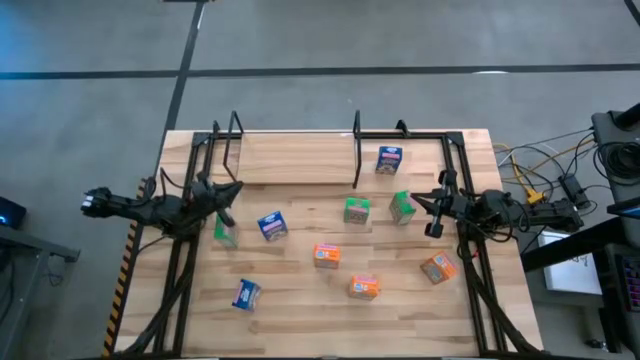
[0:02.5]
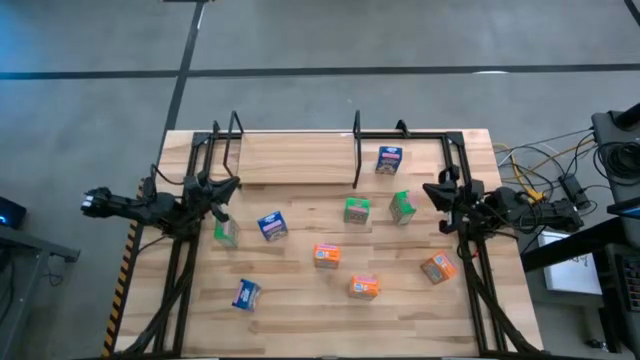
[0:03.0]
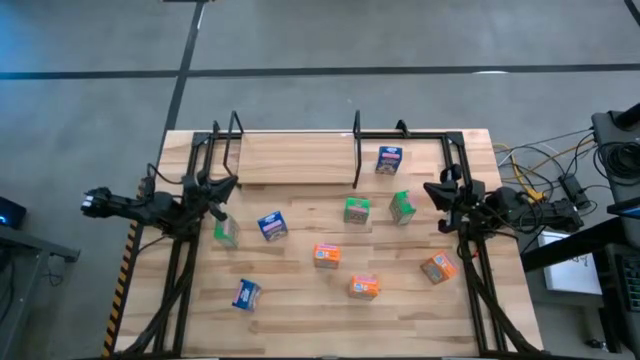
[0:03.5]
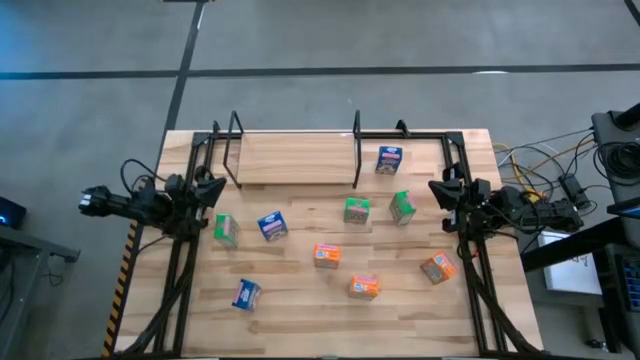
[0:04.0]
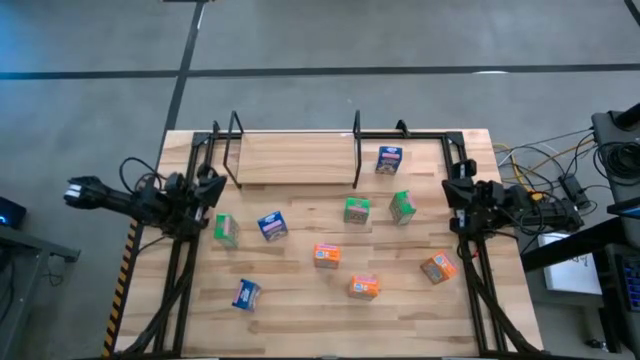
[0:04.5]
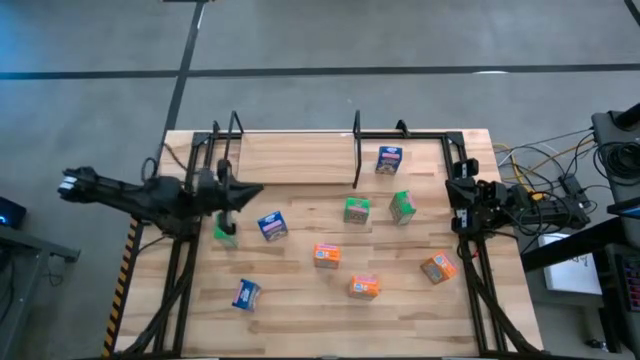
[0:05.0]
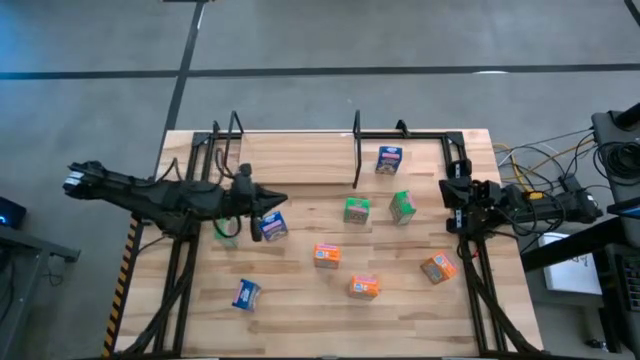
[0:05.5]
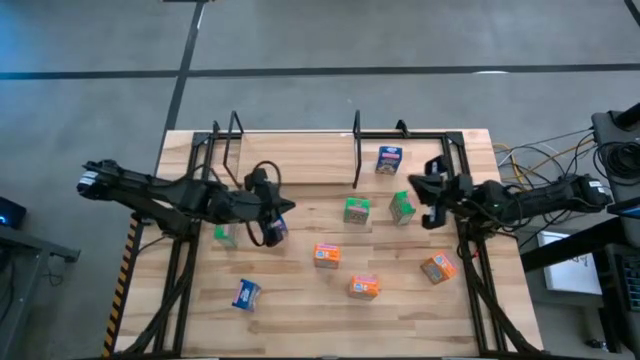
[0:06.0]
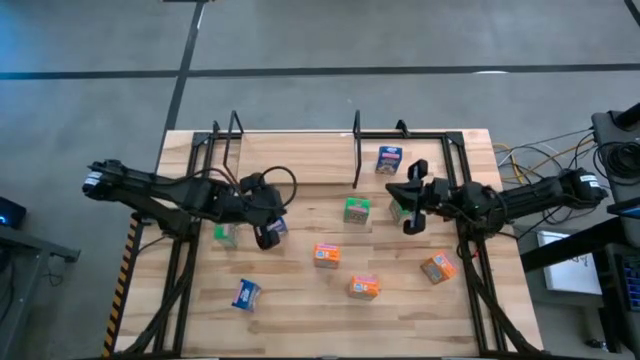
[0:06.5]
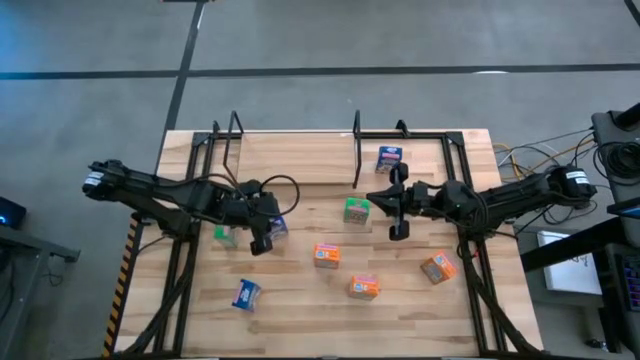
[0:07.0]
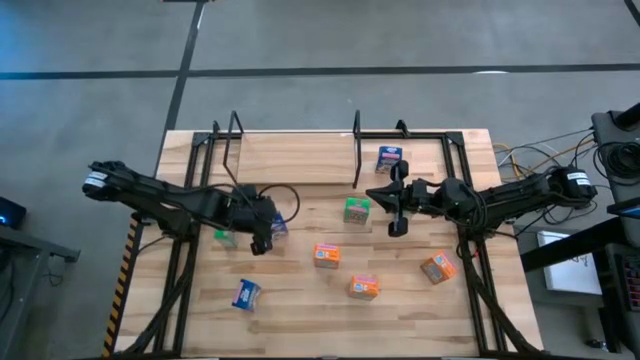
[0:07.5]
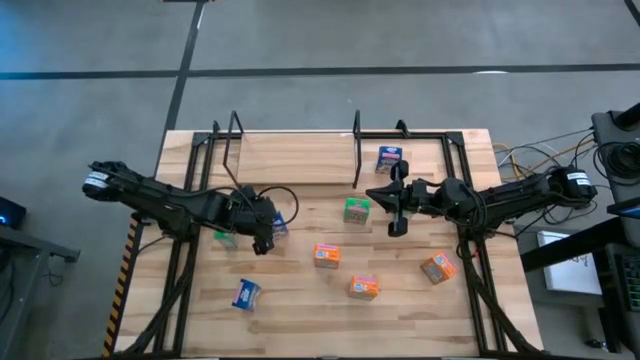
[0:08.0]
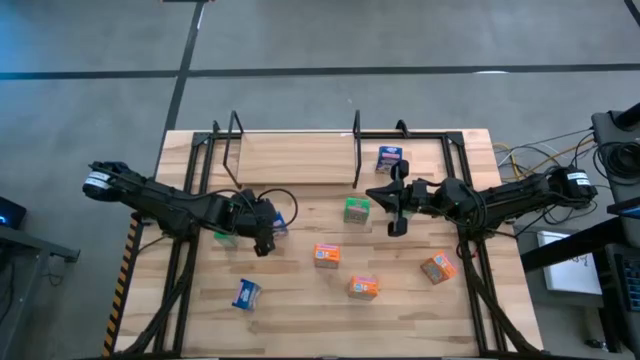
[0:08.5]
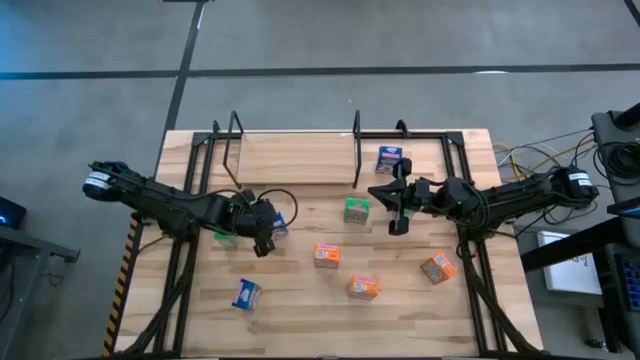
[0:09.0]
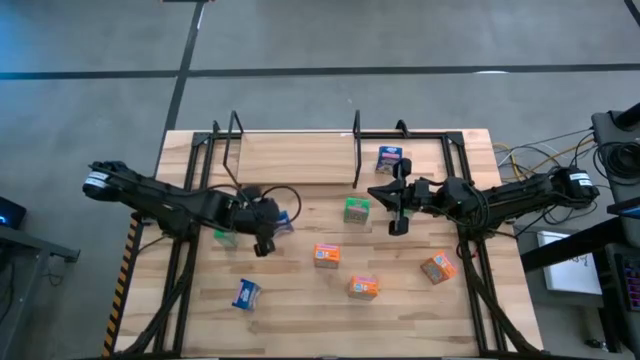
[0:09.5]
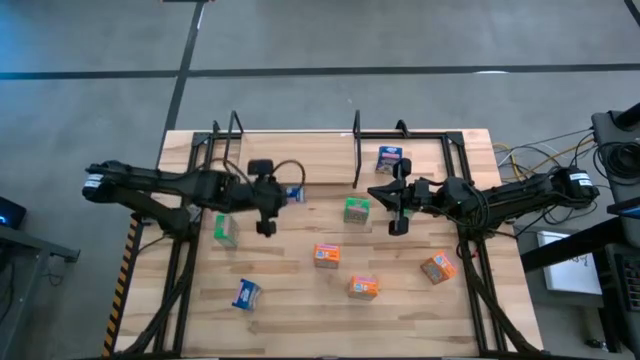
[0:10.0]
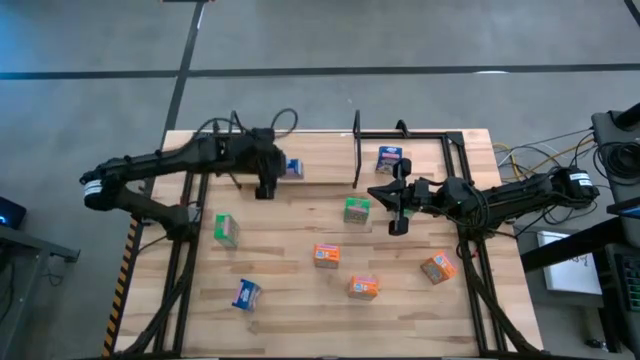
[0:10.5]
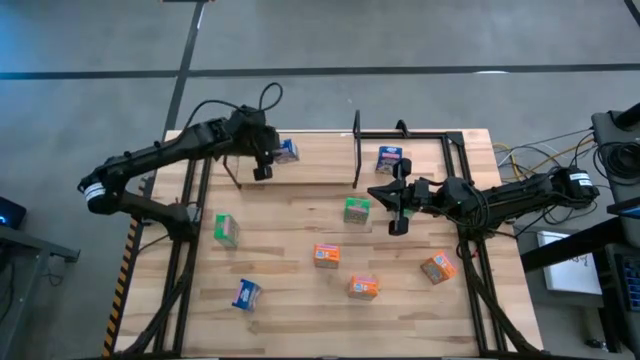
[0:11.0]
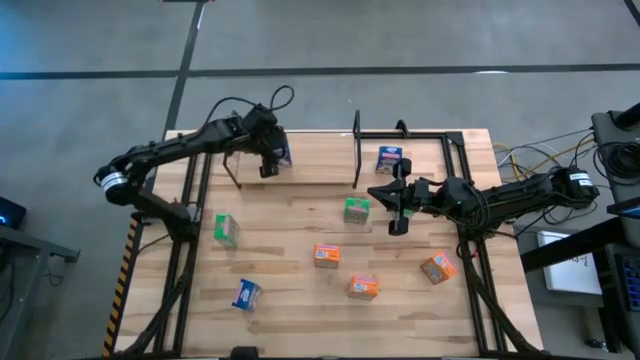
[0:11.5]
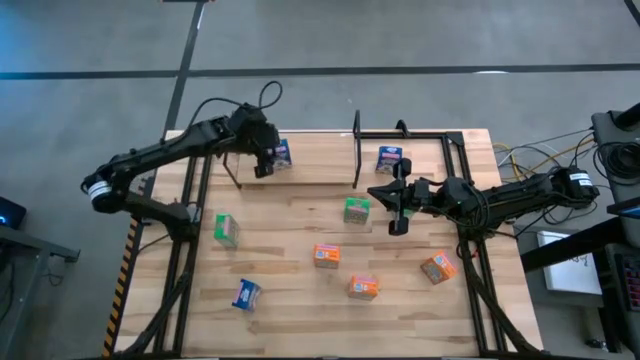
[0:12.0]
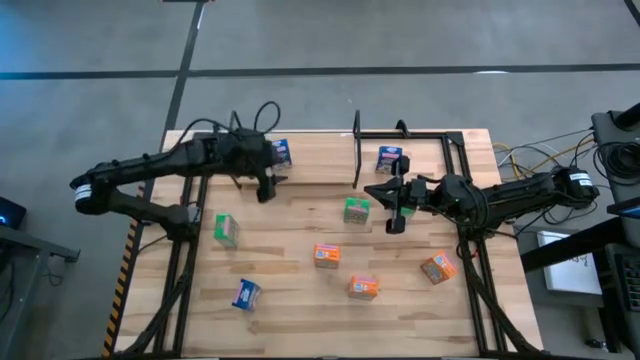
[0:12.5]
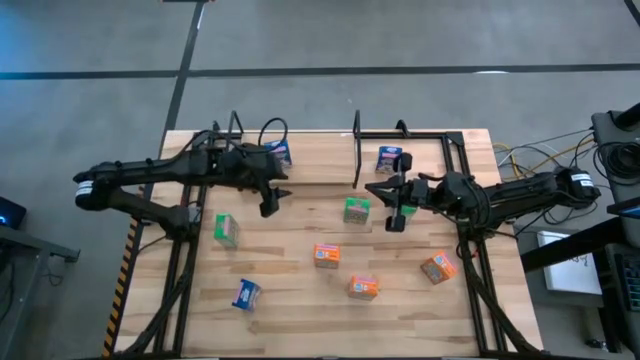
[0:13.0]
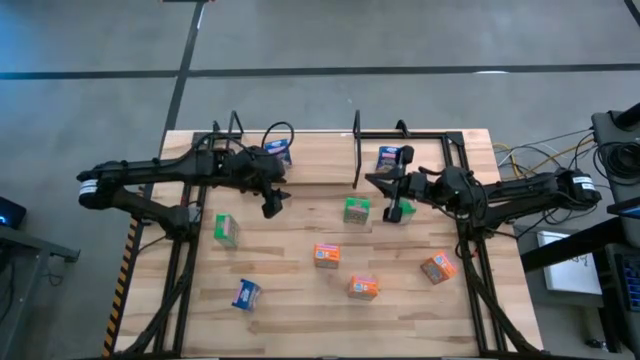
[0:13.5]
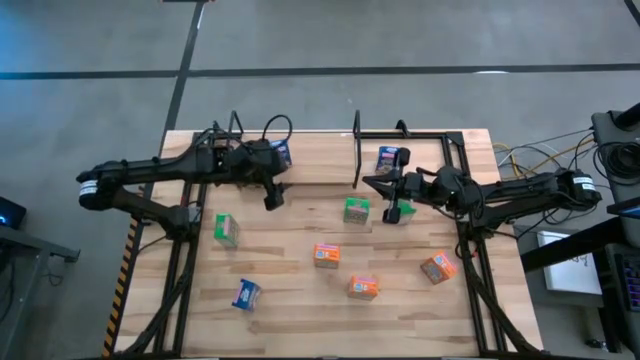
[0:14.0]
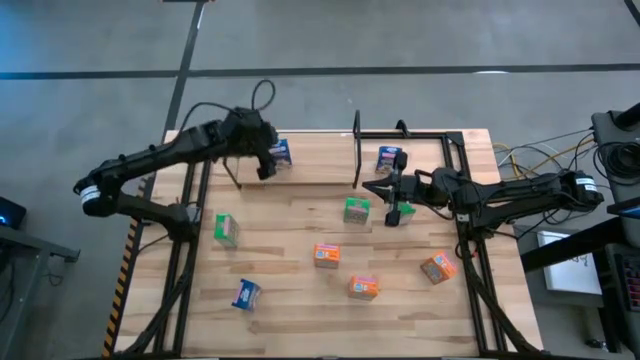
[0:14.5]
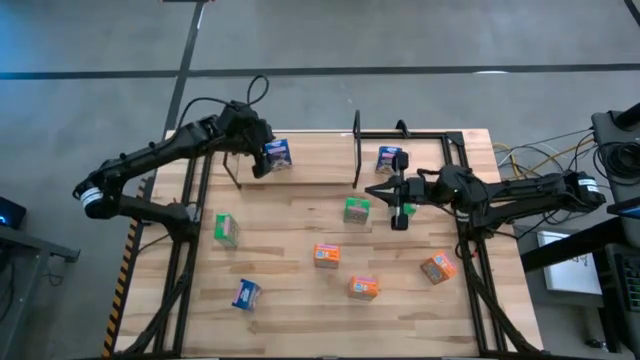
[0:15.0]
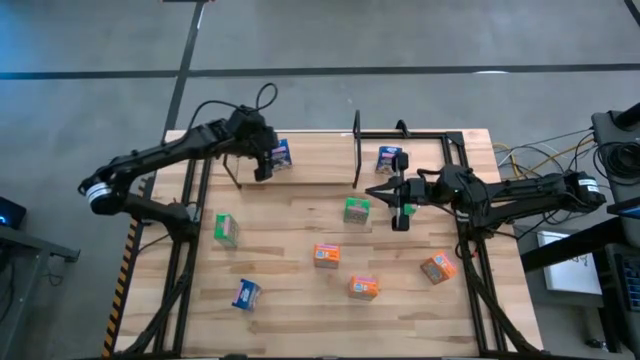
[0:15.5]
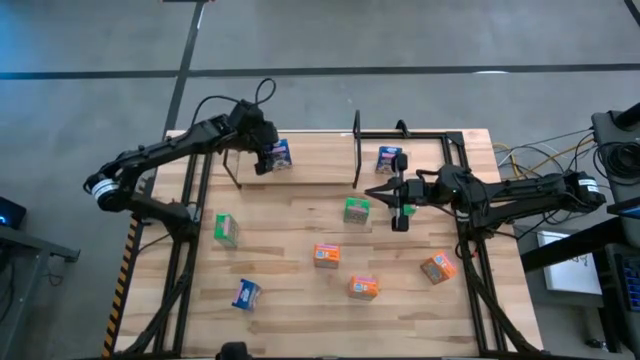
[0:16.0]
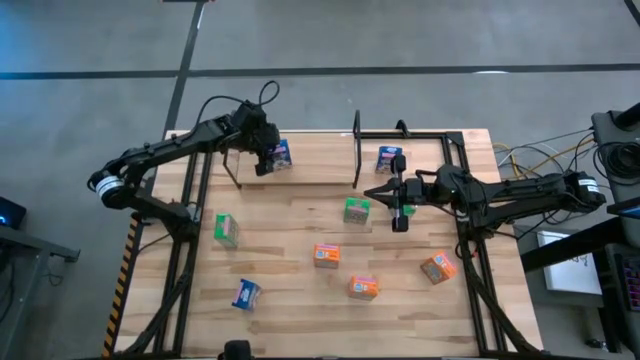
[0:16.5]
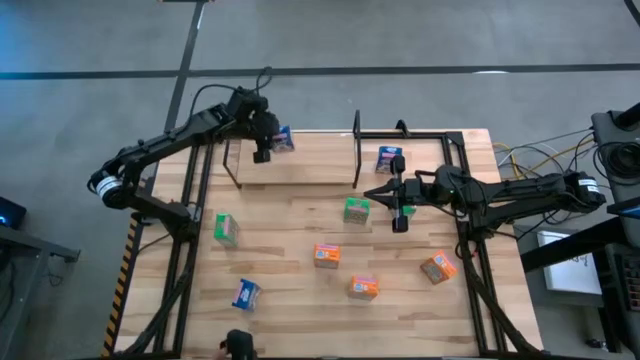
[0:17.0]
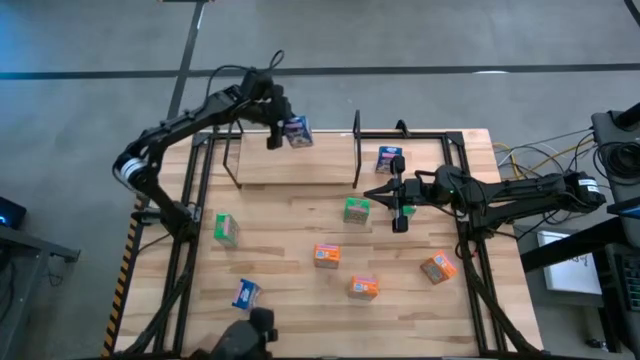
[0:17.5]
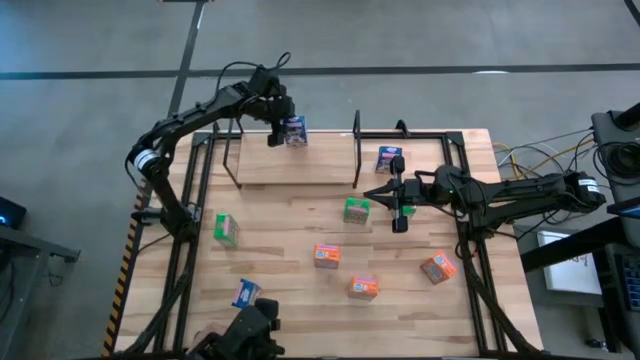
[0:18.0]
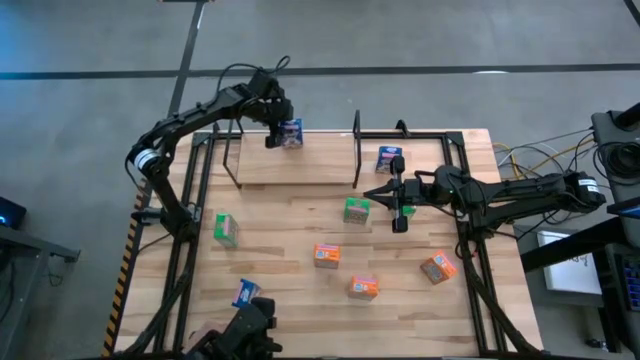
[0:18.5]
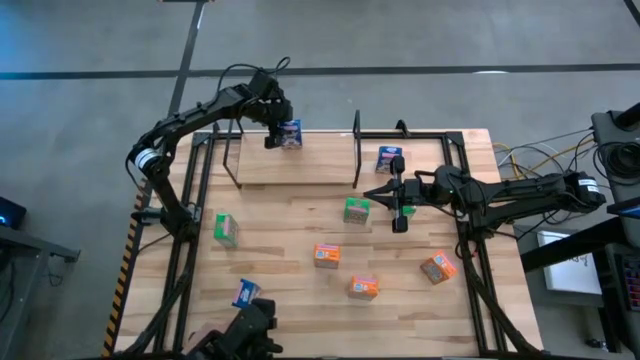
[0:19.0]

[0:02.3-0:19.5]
Task: Stack cereal on shelf
Put the middle blue cereal box on the shelf
